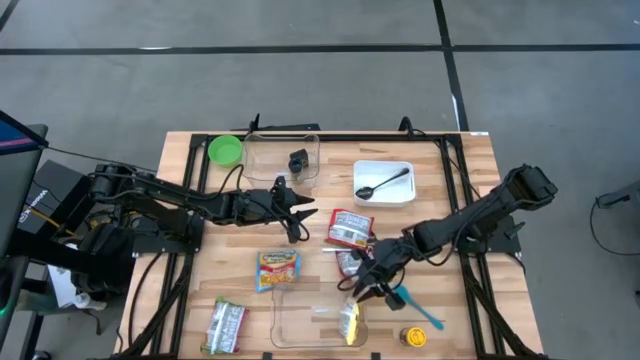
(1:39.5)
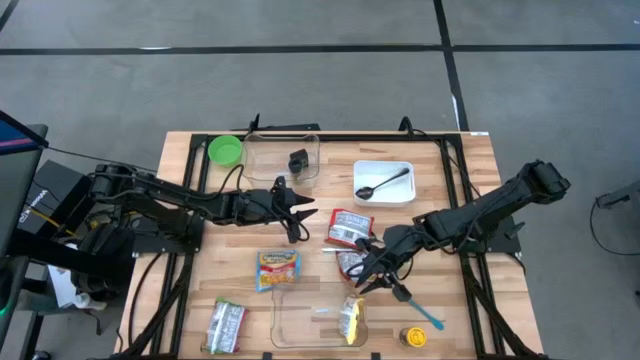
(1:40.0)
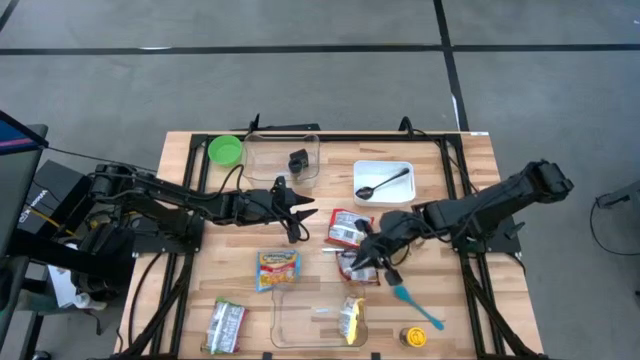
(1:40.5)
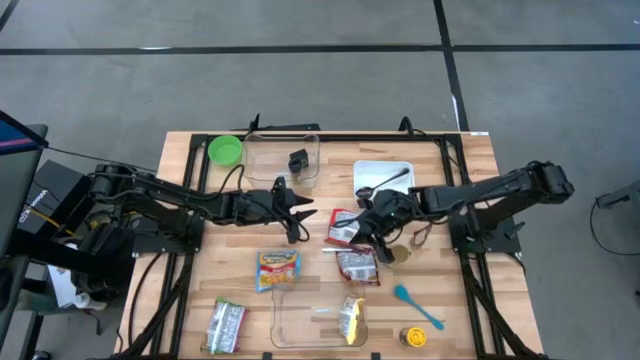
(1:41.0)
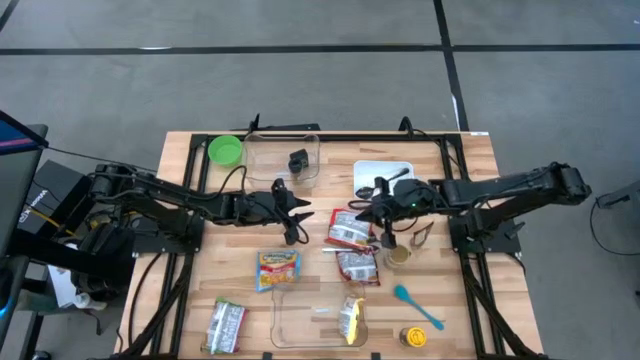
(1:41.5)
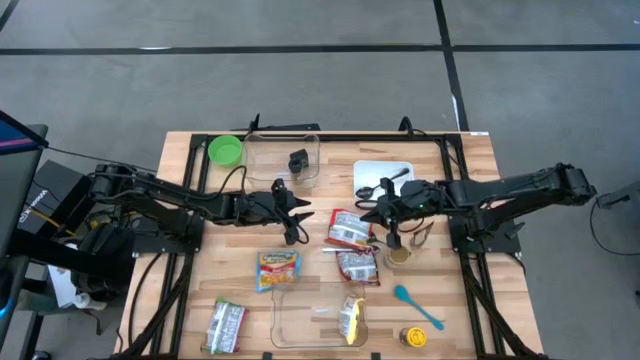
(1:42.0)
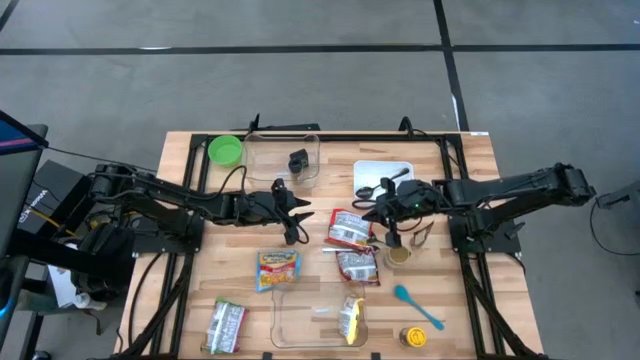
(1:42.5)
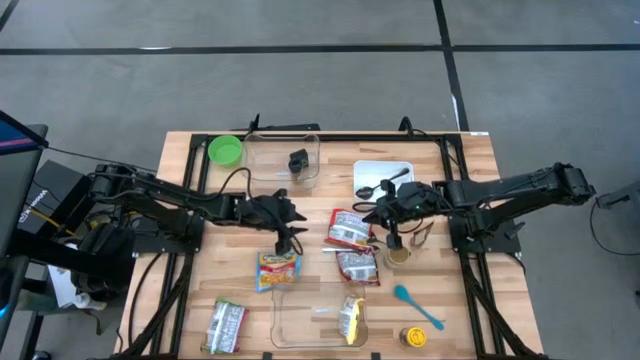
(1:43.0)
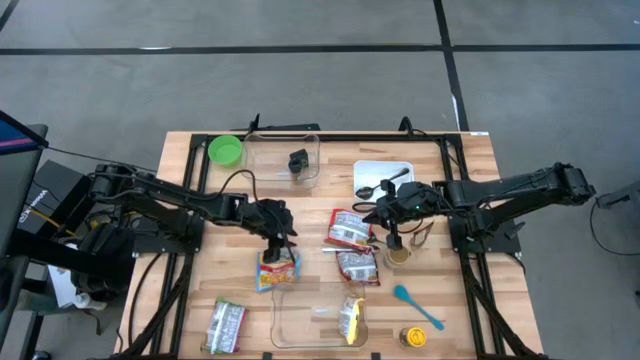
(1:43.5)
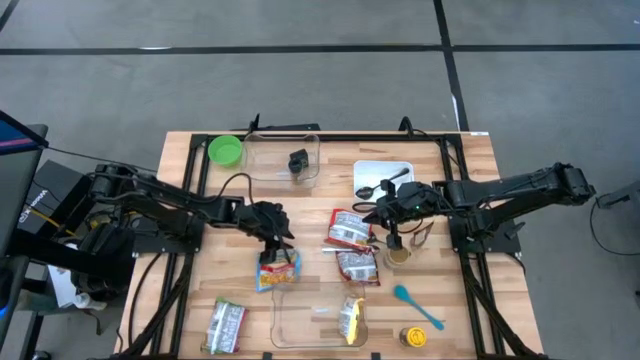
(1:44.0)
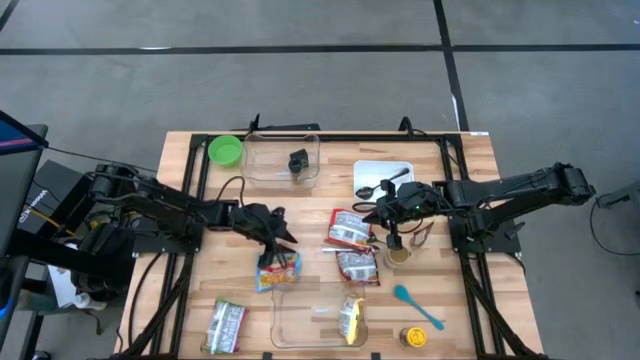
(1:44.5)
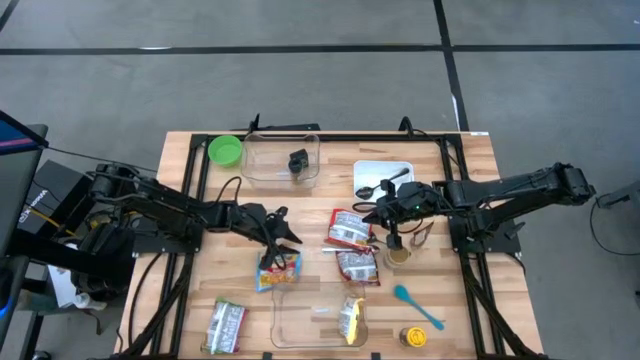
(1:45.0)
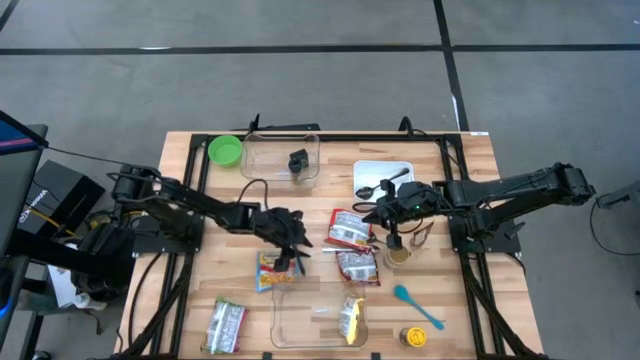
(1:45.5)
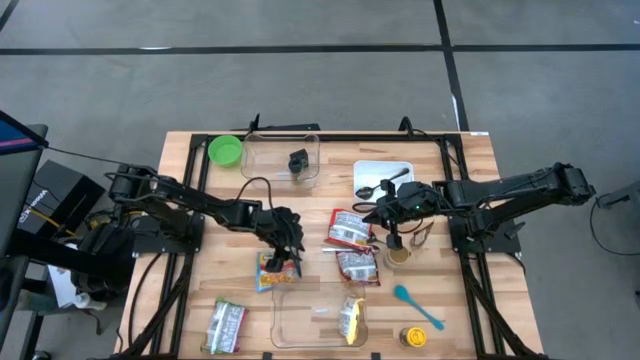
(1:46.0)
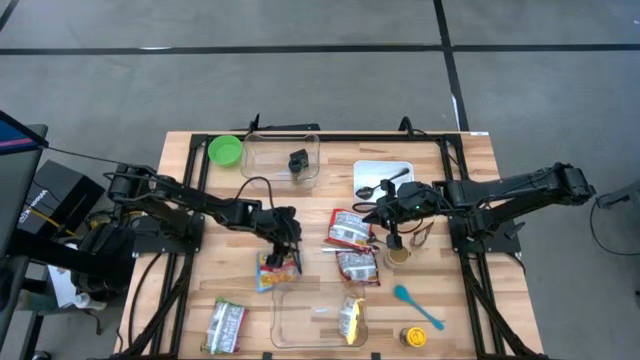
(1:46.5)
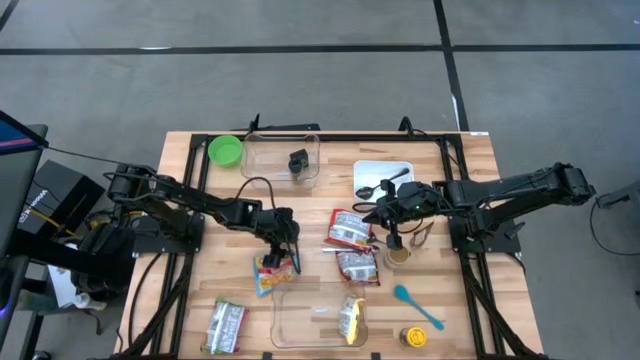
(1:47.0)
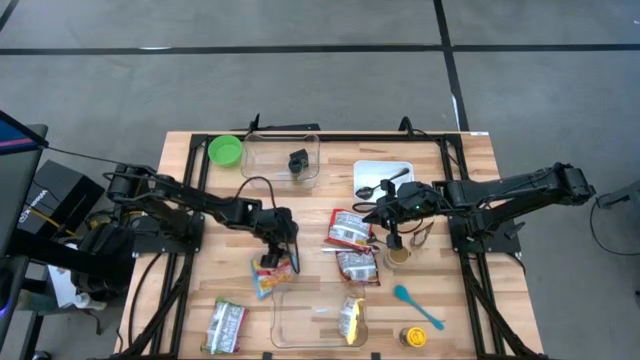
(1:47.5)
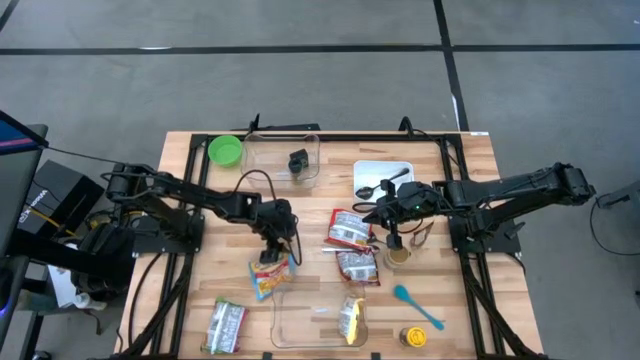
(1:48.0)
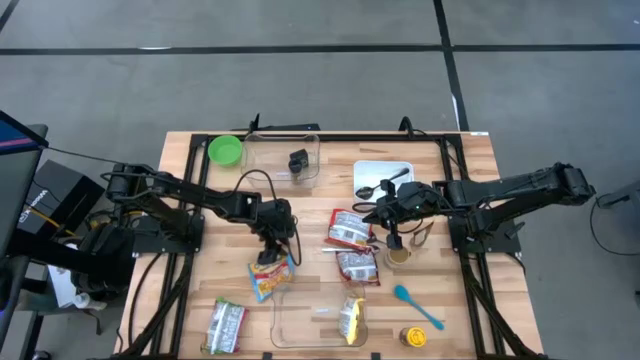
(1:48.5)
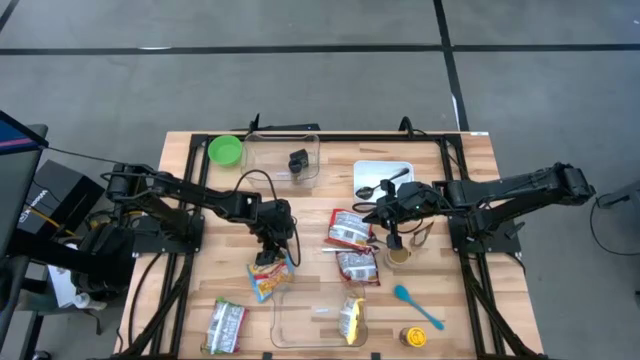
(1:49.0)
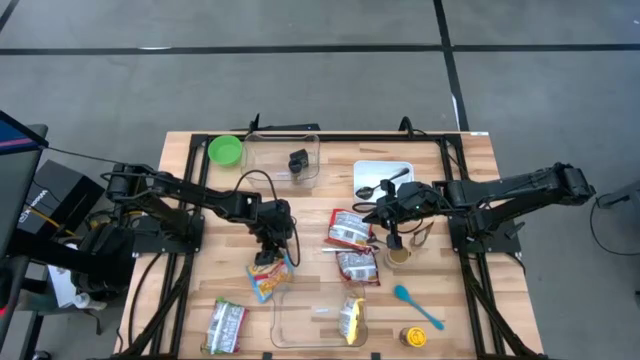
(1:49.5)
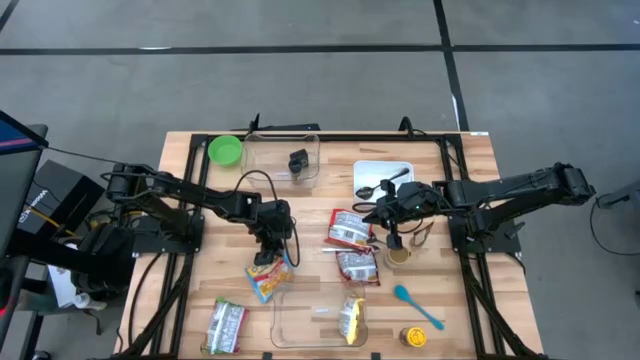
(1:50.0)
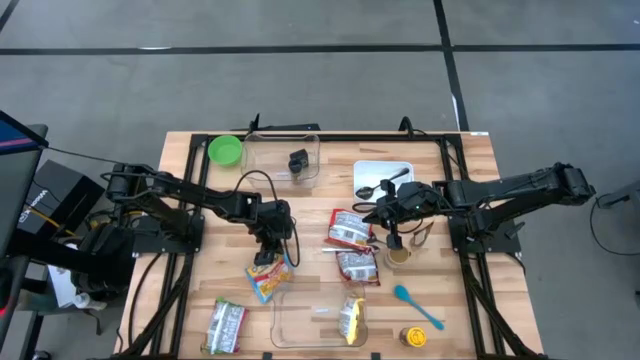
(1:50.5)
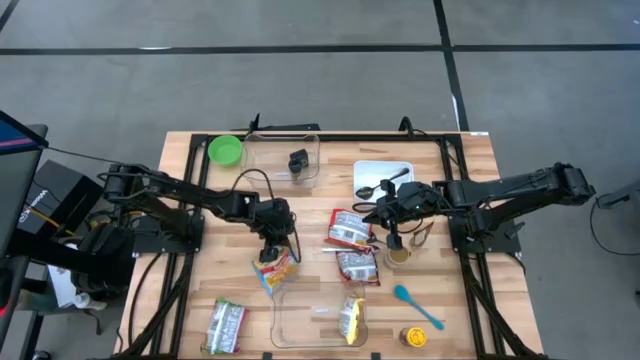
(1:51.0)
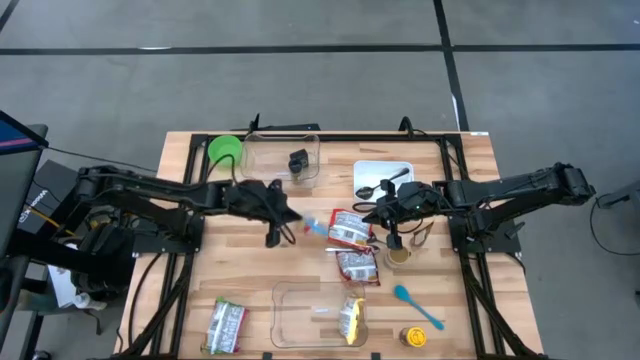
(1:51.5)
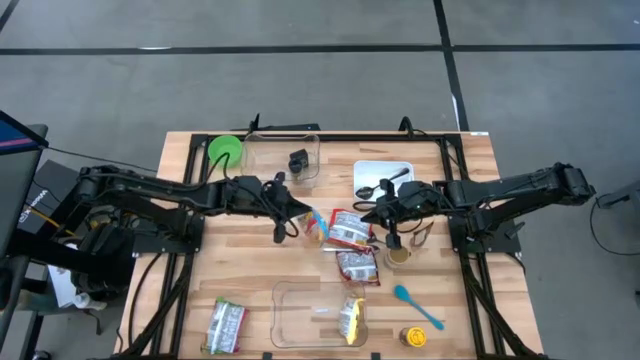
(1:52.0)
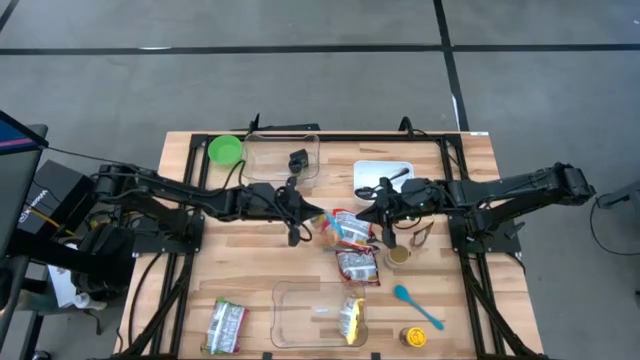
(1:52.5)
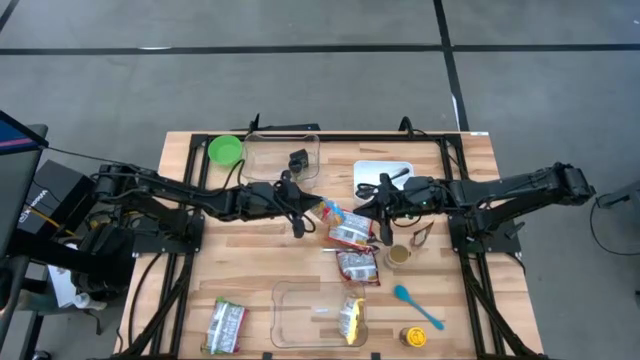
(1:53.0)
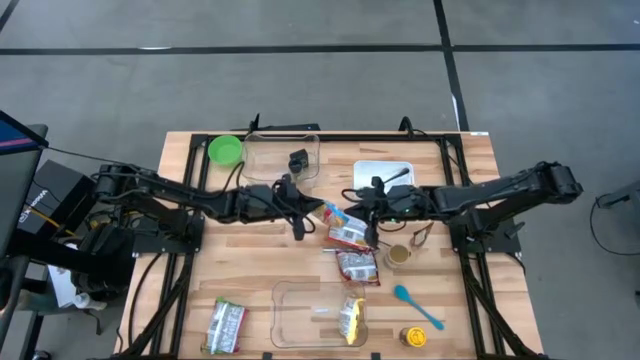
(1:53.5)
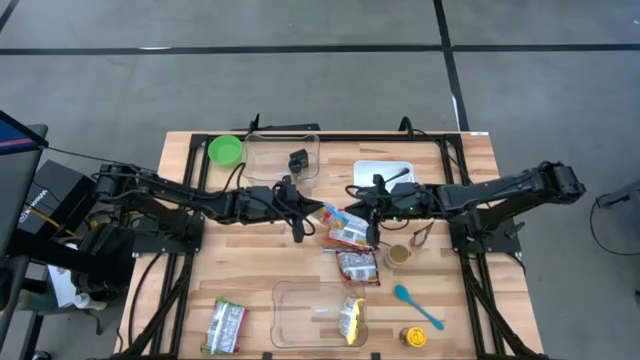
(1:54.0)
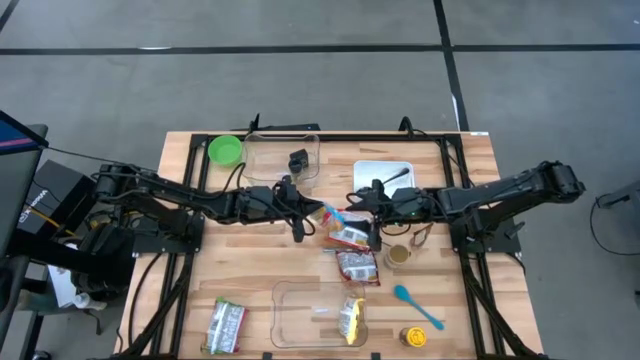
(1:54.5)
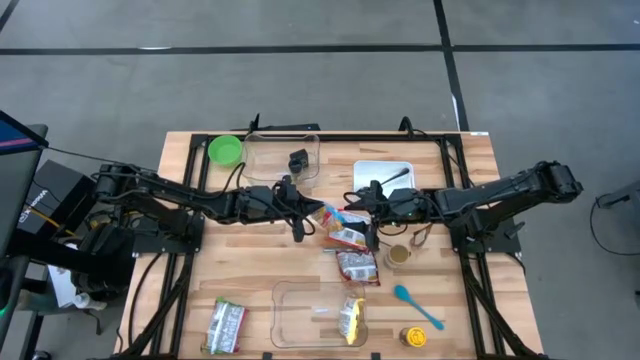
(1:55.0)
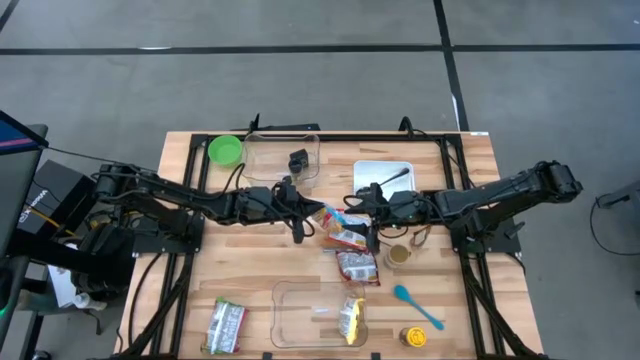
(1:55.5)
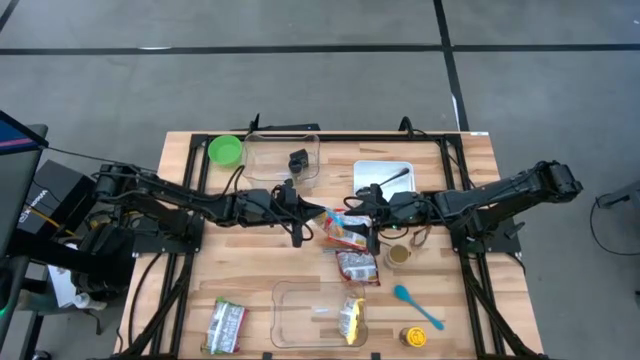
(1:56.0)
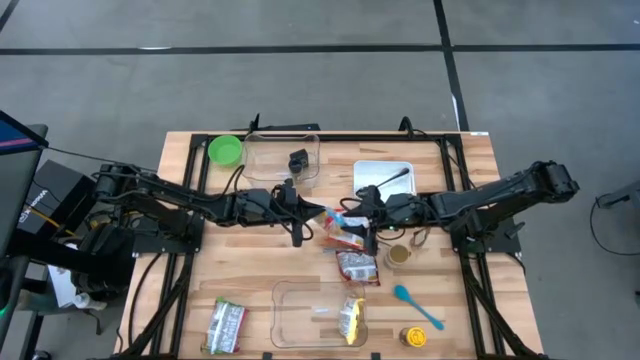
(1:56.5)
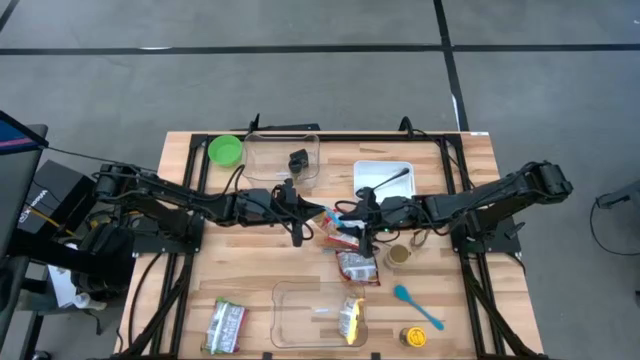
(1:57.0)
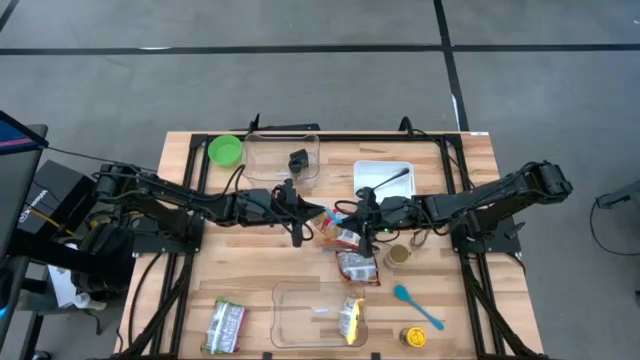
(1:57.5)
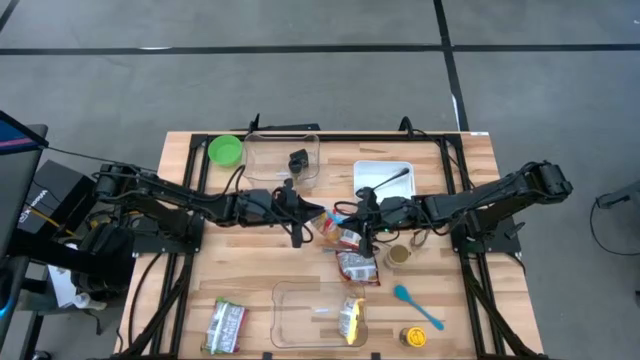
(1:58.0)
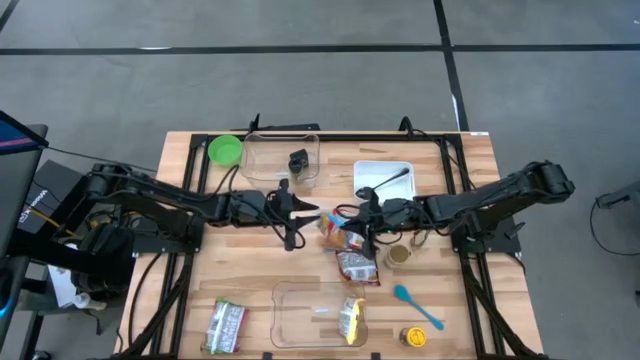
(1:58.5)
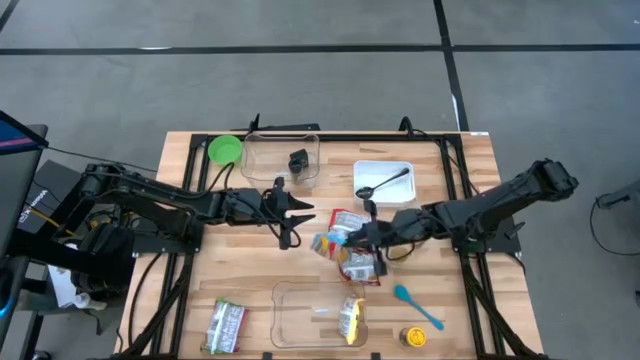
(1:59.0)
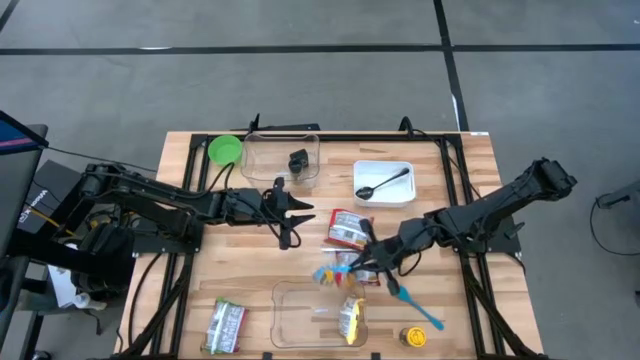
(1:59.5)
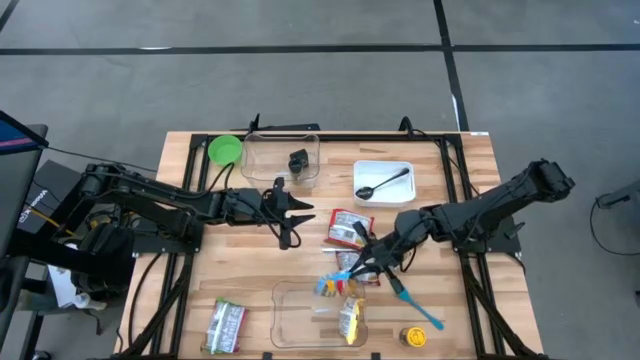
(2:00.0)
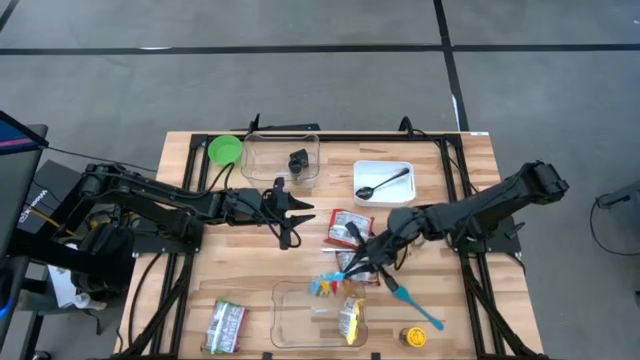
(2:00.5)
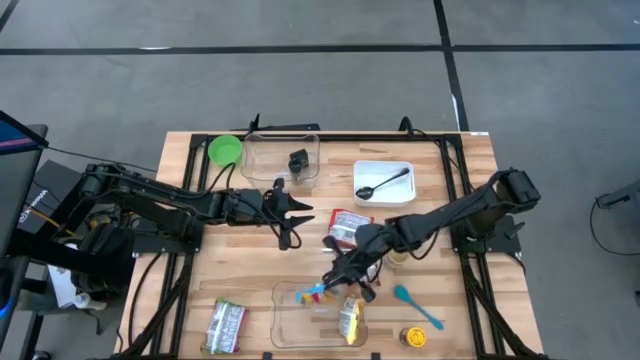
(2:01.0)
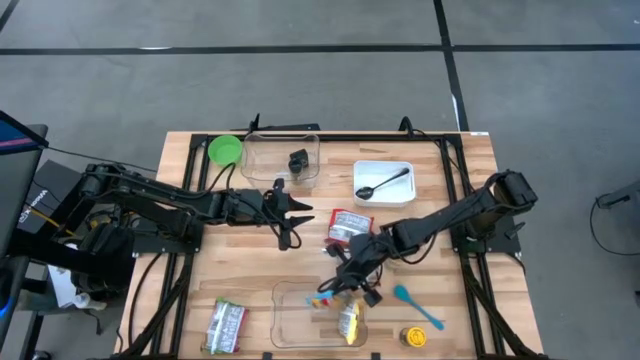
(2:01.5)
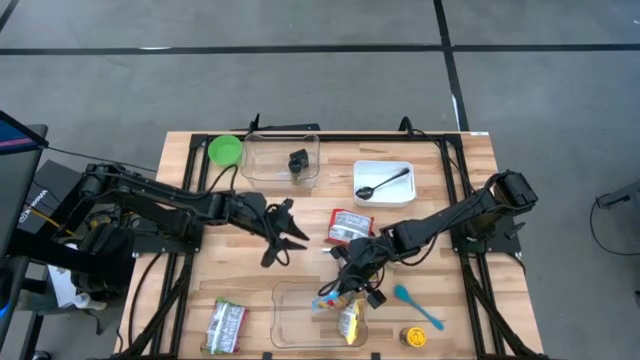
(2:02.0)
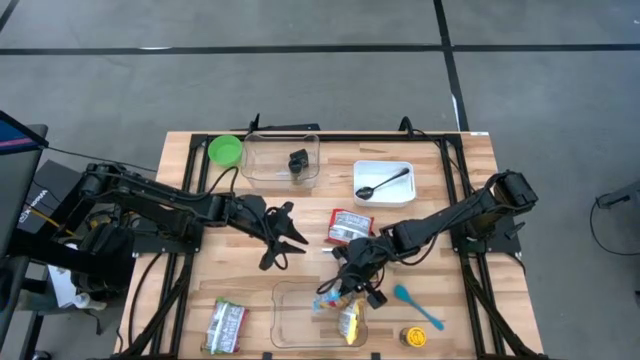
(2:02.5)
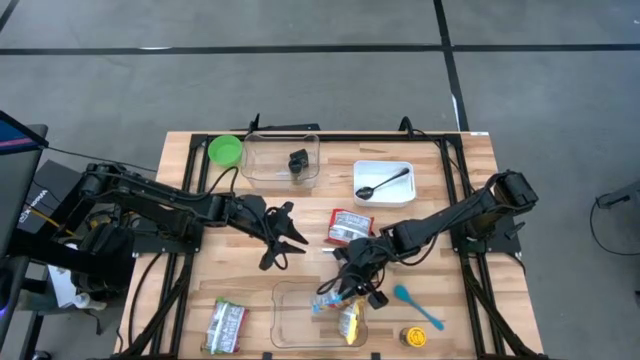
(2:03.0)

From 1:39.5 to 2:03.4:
Task: Pick & Place Food Item
Put the blue noodle pack into the bottom transparent bin
